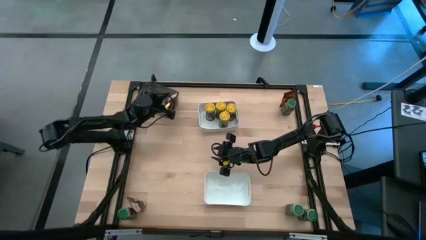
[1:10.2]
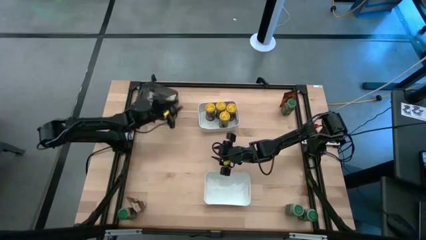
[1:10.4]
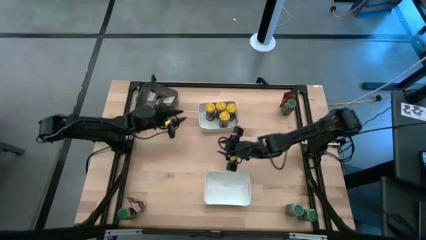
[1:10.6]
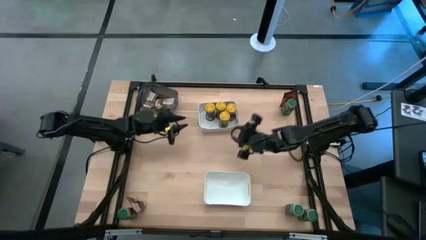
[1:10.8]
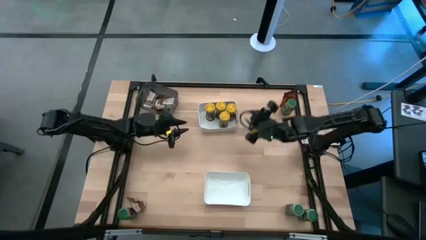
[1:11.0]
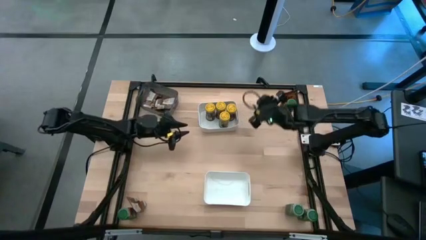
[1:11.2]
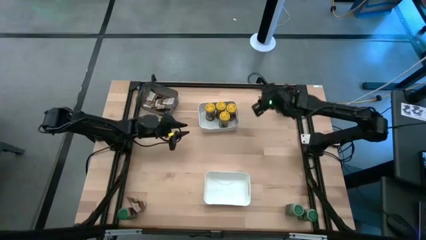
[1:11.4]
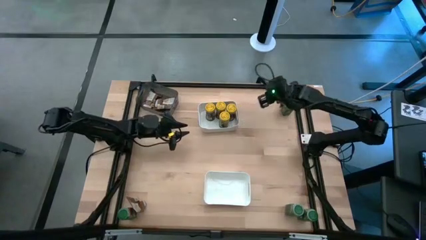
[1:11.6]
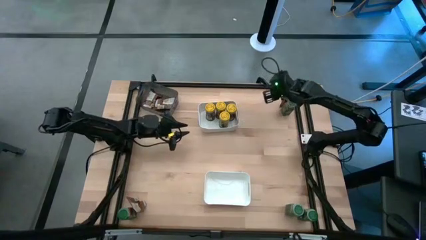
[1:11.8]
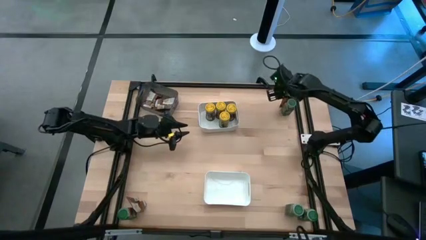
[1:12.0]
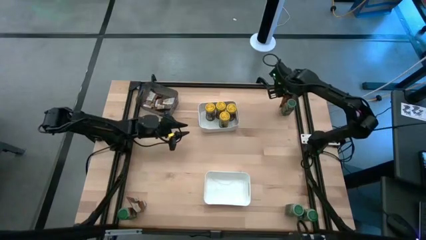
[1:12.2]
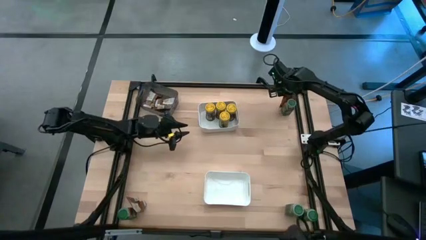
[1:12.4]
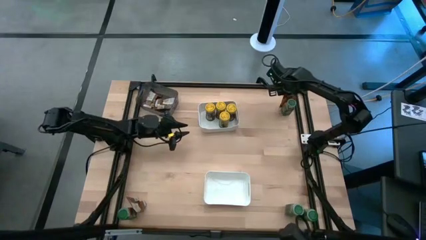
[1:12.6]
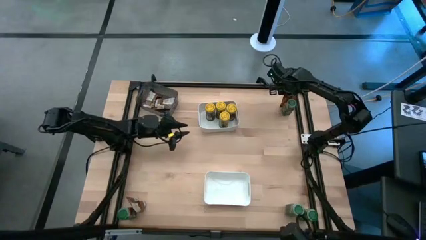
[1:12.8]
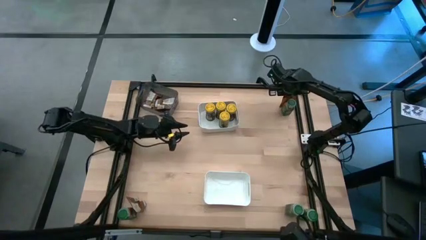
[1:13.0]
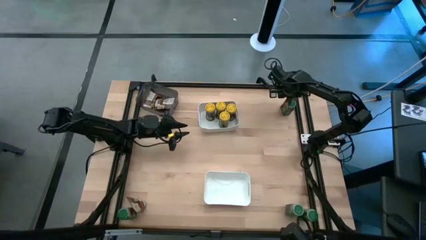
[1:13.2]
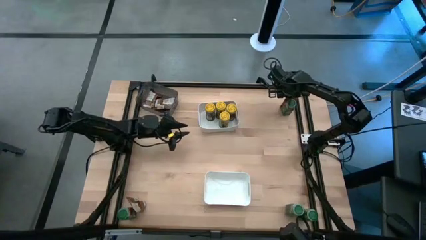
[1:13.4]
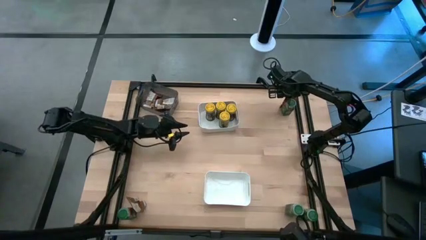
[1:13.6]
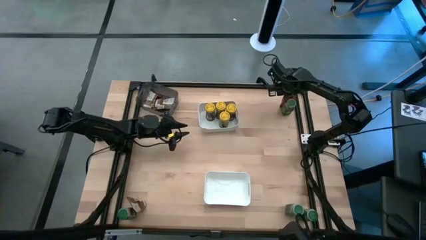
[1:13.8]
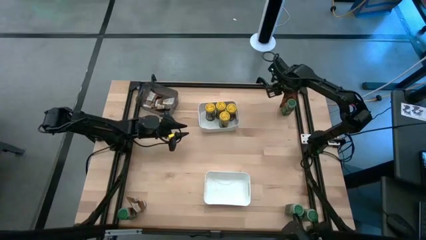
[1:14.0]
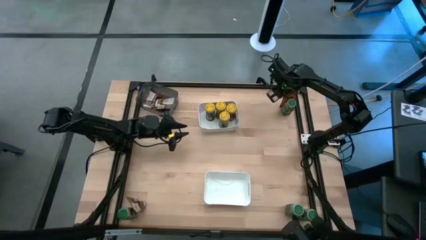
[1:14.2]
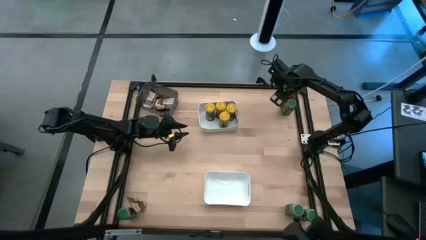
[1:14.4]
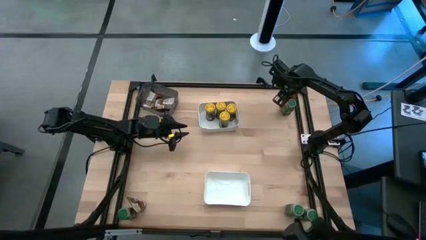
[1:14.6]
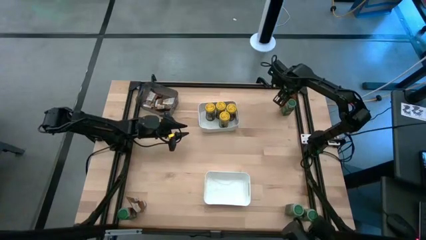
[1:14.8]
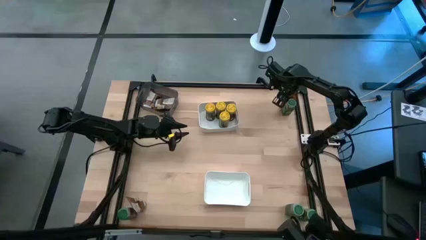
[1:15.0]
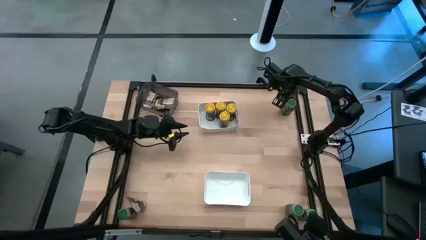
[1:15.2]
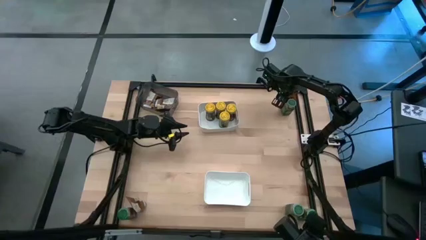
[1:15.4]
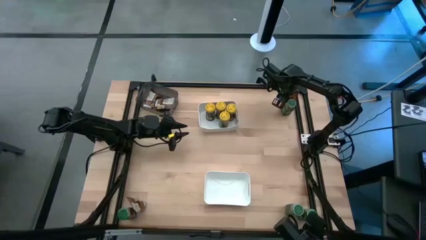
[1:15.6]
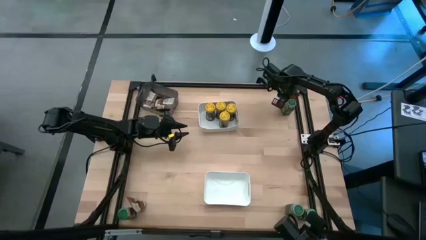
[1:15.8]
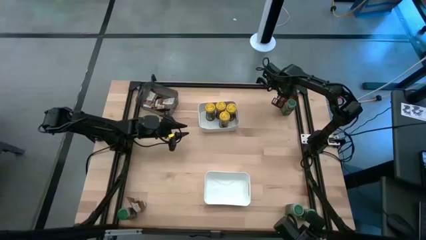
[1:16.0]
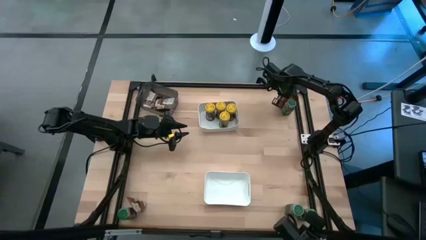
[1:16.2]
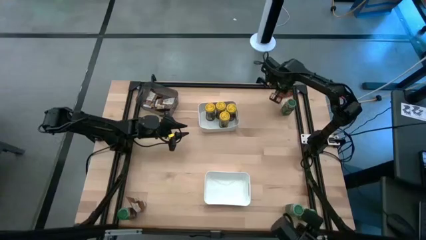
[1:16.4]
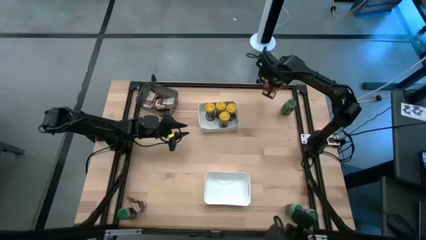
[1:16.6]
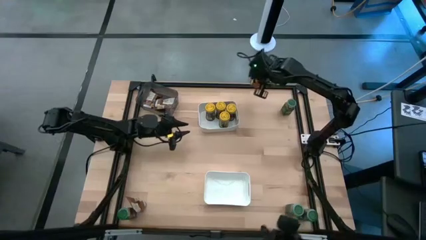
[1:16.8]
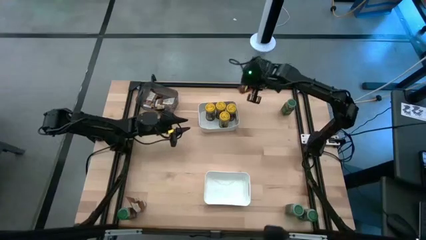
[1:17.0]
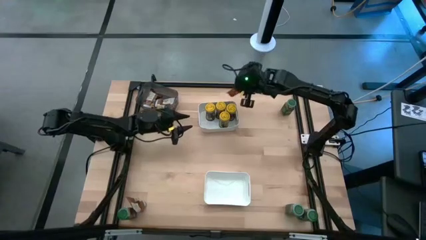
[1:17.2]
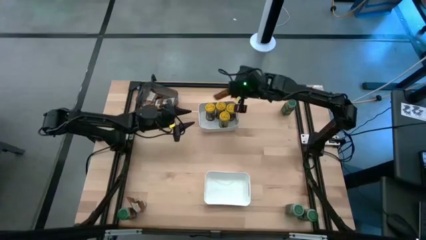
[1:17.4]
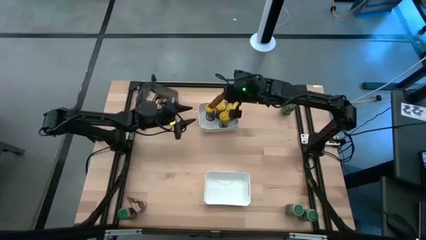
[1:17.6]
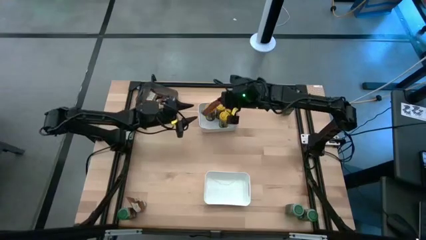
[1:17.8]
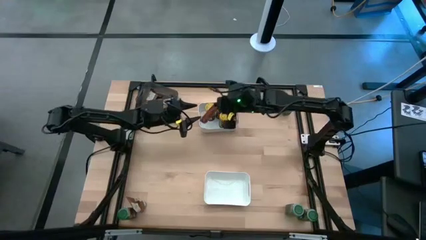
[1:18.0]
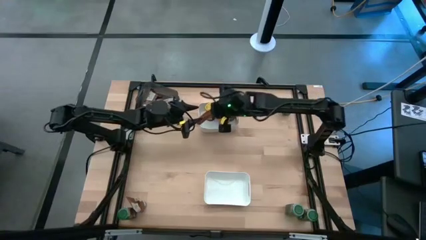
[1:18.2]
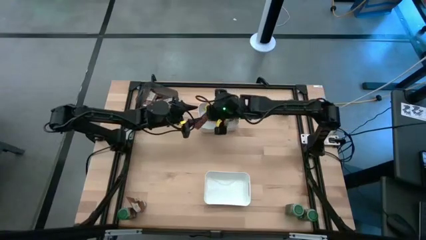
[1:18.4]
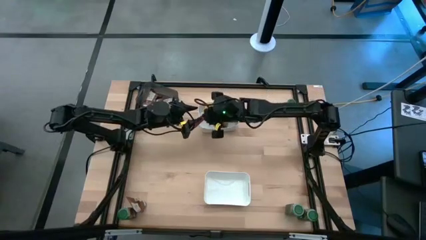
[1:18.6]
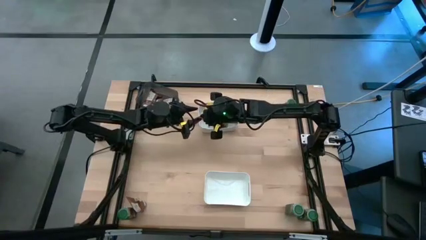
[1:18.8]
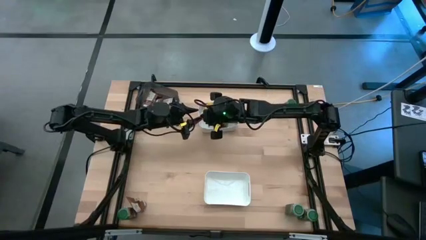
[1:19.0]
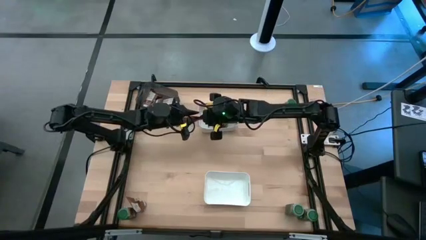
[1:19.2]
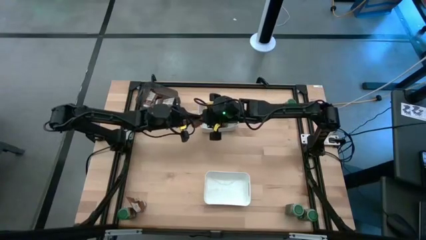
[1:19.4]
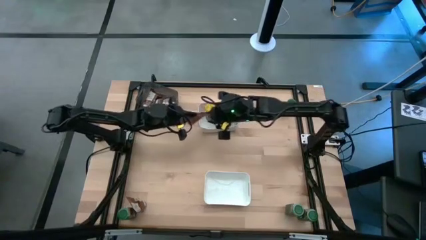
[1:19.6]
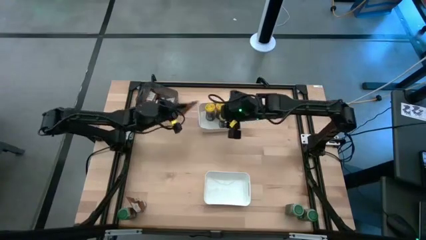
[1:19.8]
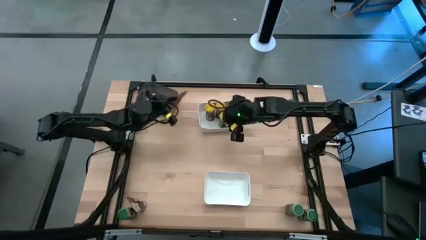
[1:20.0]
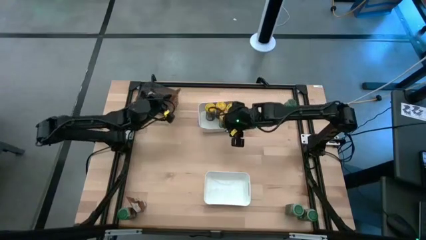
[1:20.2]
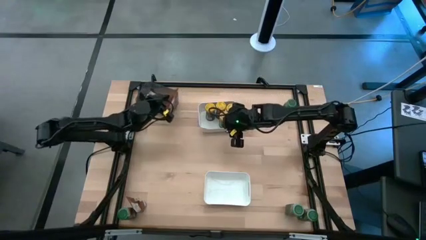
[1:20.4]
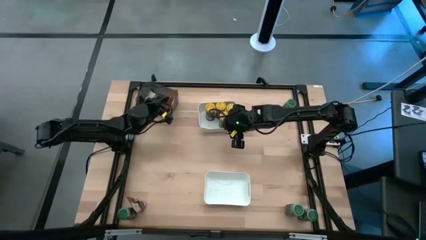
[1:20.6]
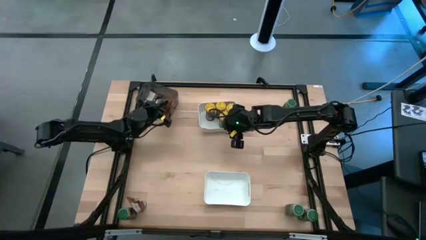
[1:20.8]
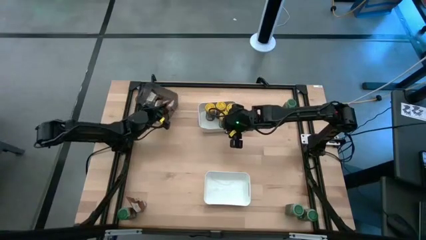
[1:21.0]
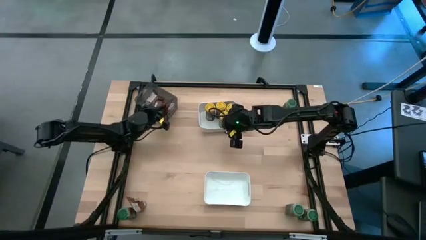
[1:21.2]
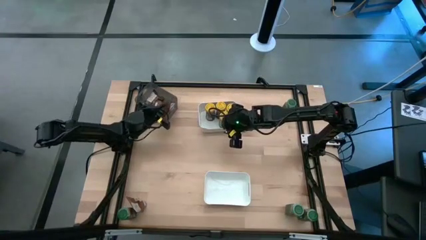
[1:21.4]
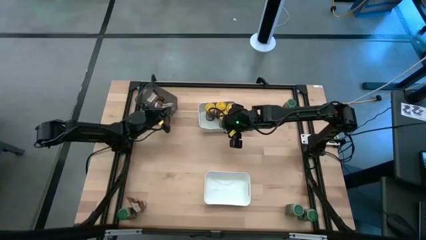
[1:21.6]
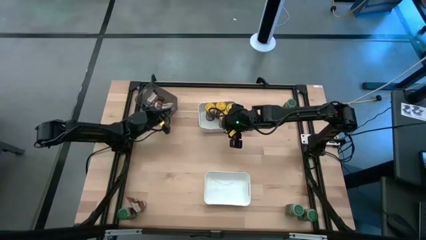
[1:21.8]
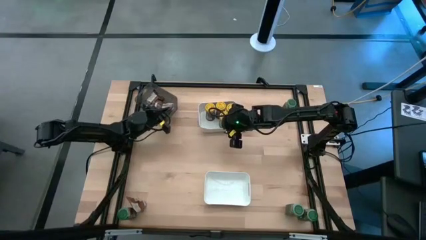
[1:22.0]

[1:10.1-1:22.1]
Task: Sort spices by type
Put the seasoning pack into the black bin

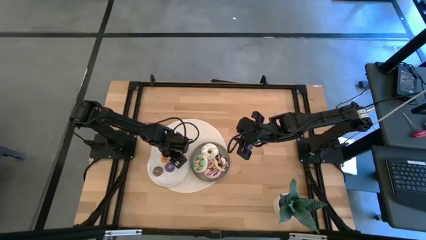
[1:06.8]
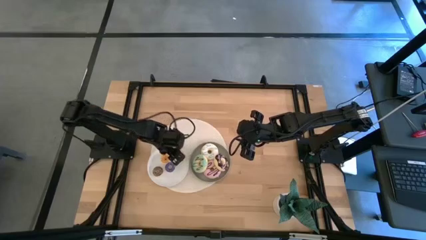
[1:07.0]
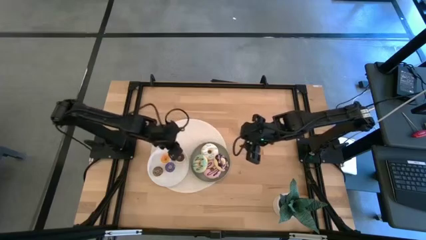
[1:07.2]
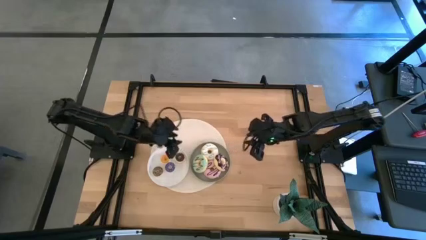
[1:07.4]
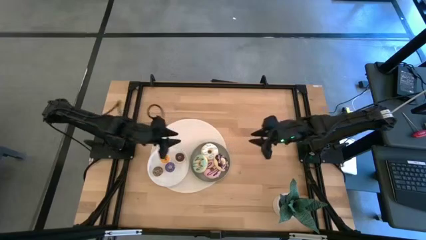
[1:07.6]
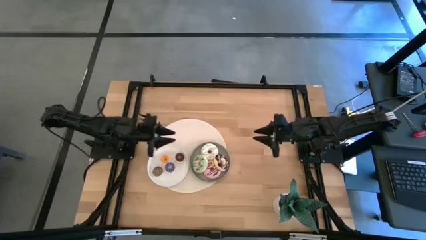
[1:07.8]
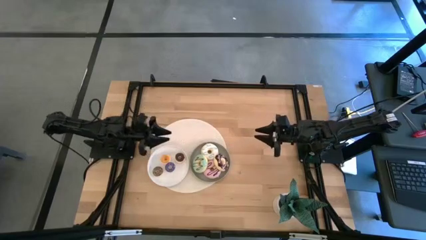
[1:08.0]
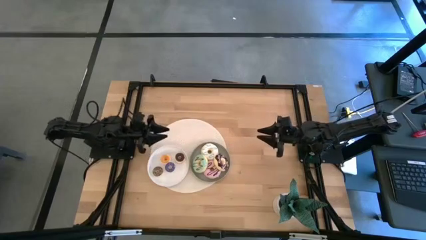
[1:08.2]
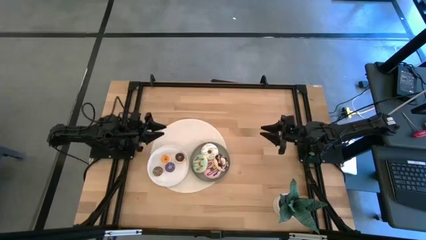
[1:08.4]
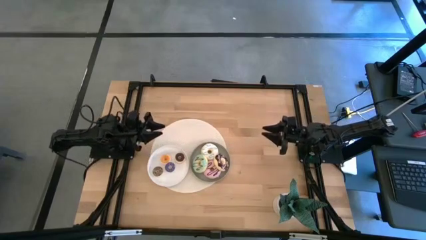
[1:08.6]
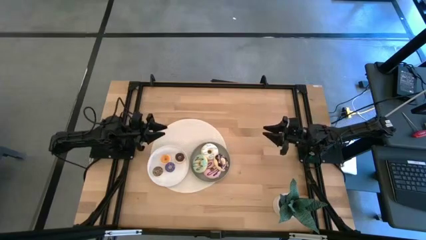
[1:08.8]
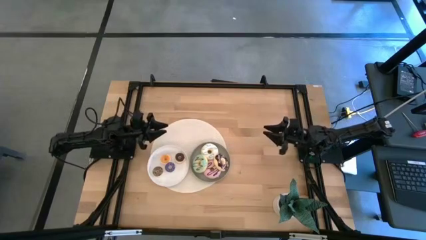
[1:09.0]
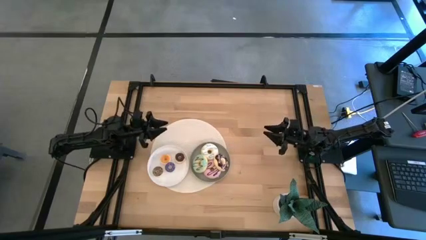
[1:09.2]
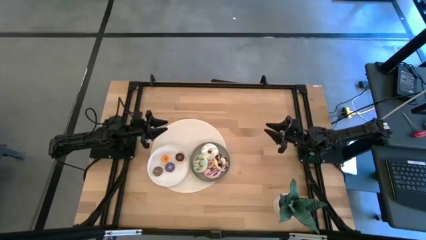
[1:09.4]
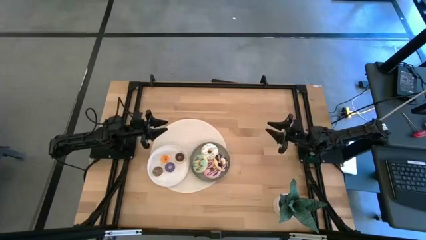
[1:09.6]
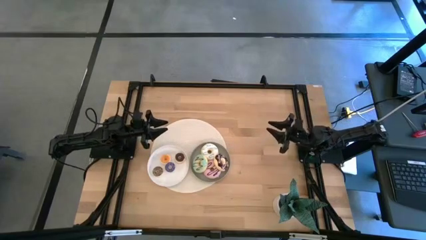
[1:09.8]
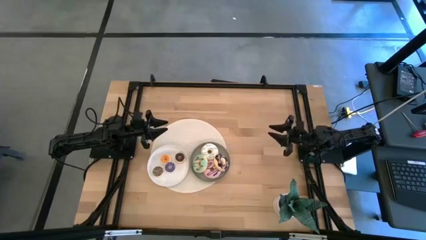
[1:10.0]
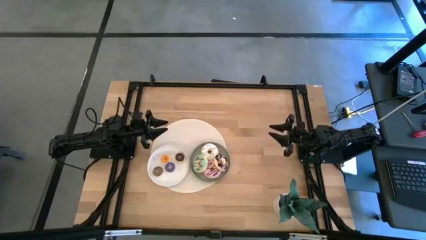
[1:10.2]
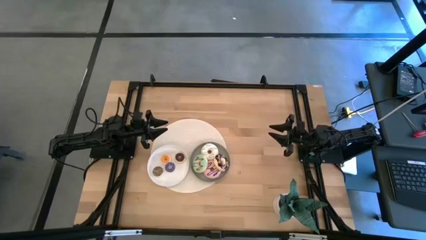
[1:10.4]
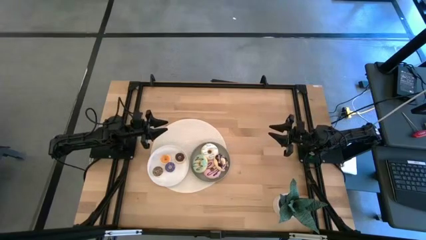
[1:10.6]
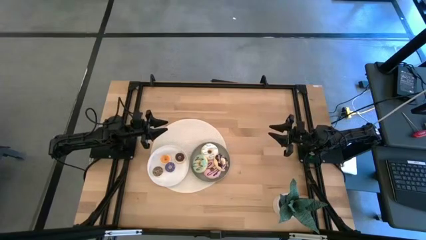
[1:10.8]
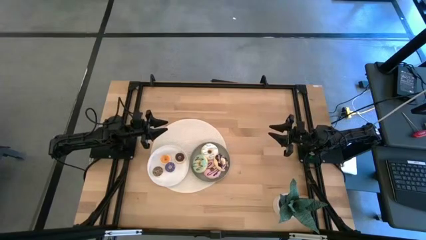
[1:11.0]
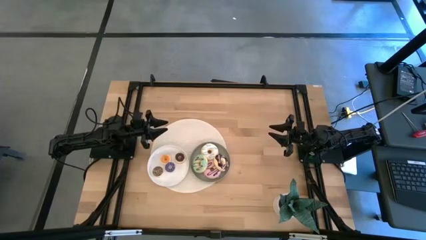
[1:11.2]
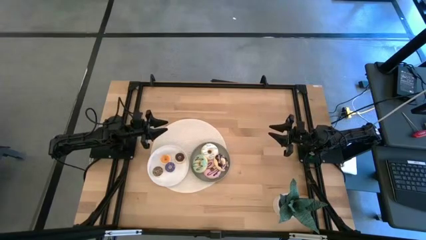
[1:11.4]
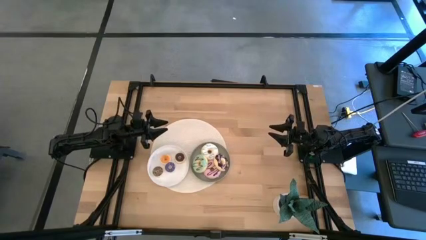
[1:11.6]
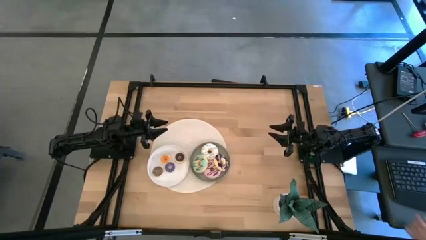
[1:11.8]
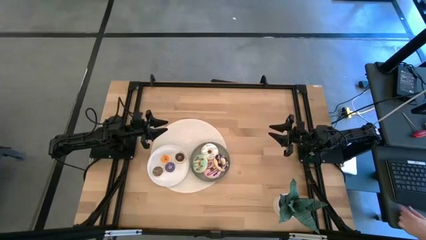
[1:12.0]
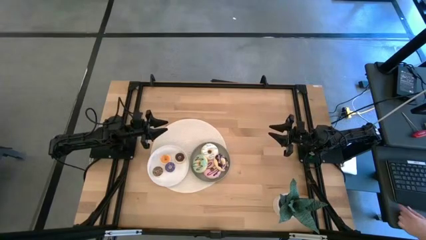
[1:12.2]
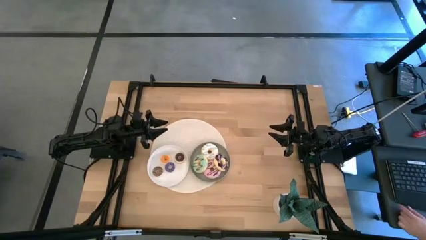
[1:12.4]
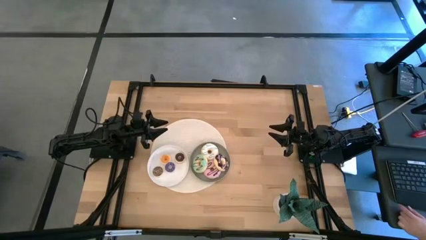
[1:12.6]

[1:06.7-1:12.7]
Task: Pick & Place donuts
Return to Home Position
